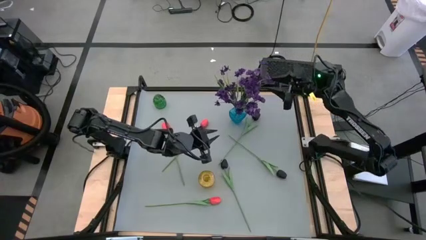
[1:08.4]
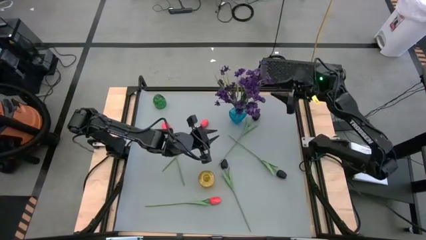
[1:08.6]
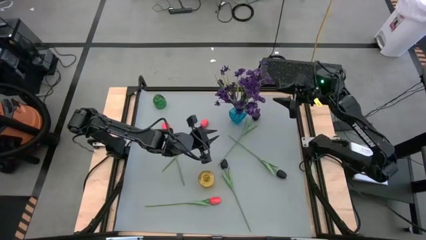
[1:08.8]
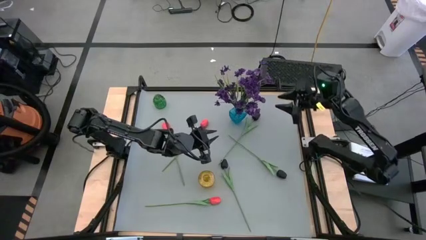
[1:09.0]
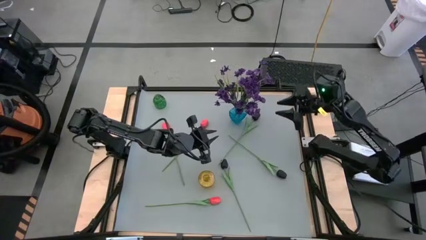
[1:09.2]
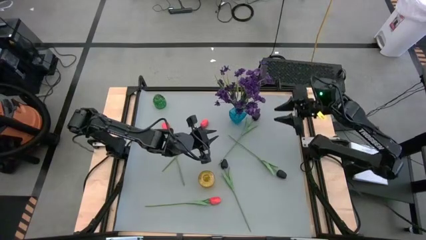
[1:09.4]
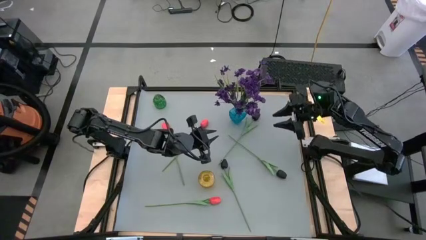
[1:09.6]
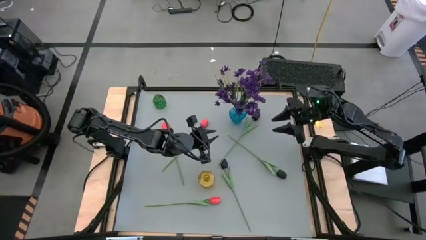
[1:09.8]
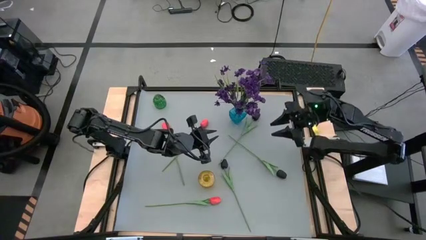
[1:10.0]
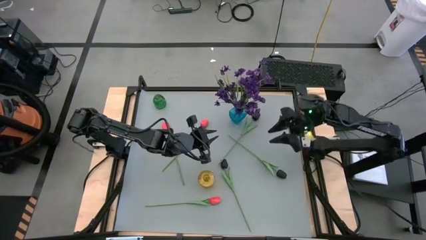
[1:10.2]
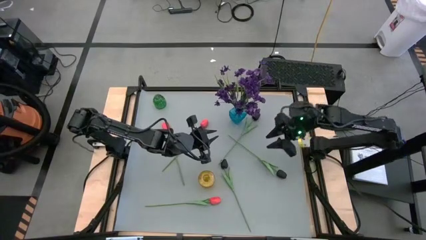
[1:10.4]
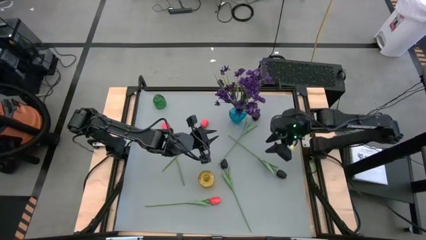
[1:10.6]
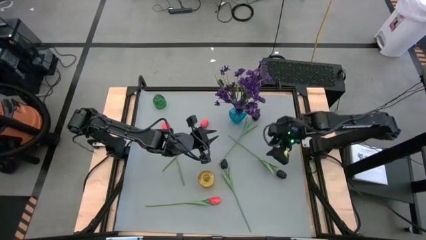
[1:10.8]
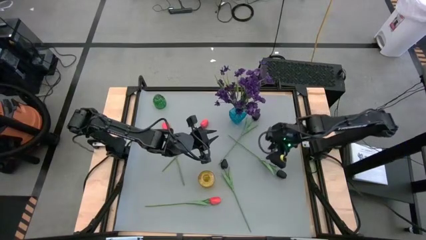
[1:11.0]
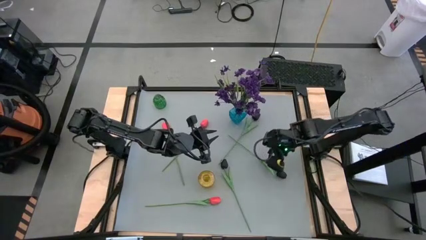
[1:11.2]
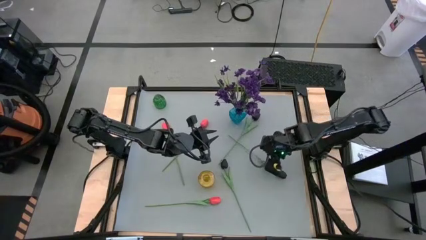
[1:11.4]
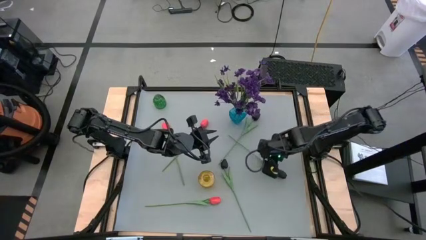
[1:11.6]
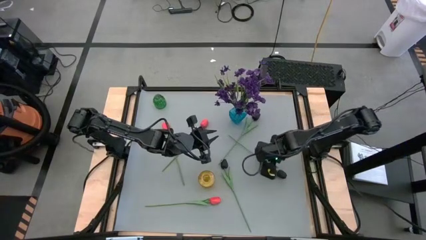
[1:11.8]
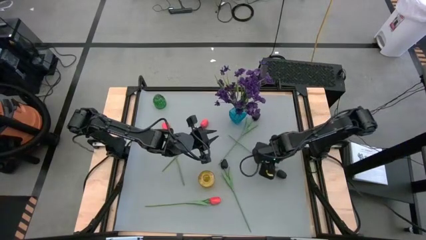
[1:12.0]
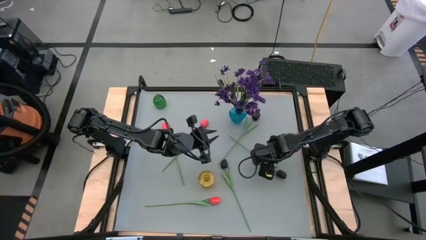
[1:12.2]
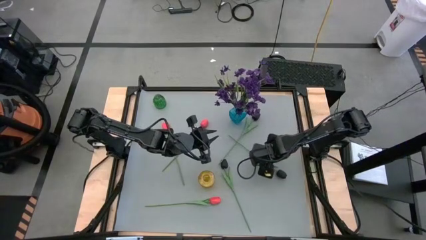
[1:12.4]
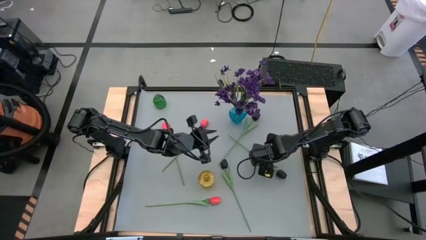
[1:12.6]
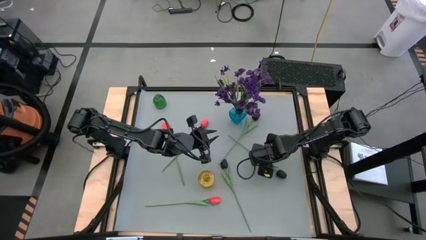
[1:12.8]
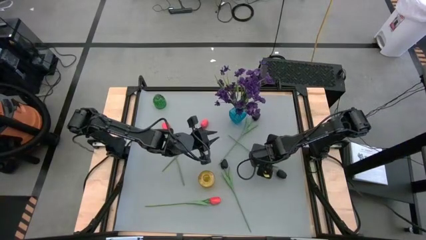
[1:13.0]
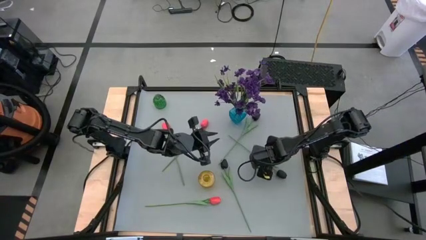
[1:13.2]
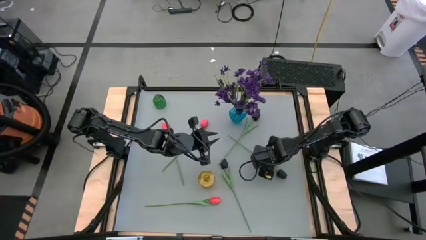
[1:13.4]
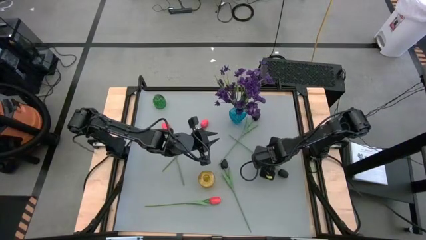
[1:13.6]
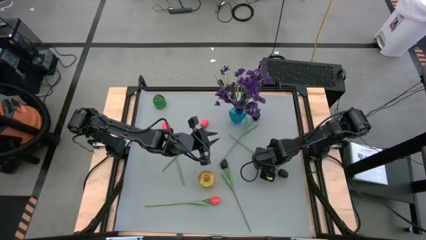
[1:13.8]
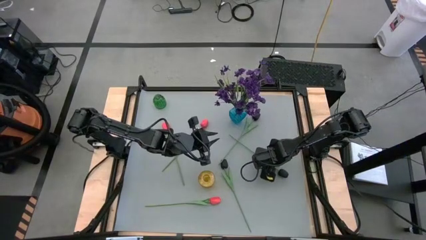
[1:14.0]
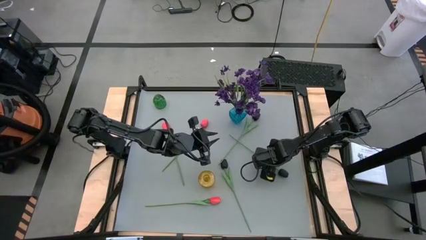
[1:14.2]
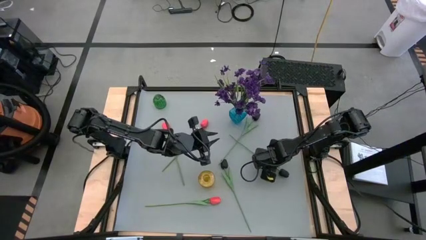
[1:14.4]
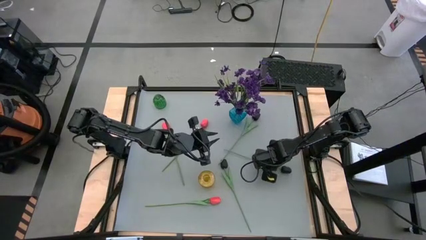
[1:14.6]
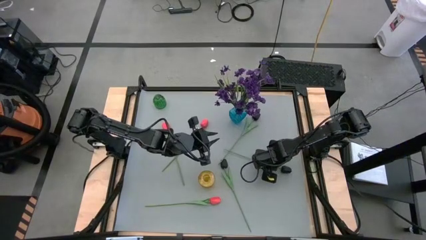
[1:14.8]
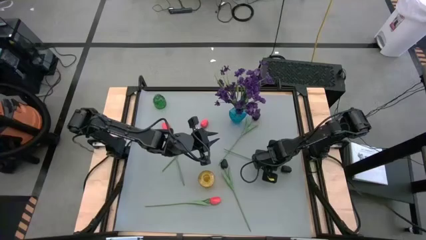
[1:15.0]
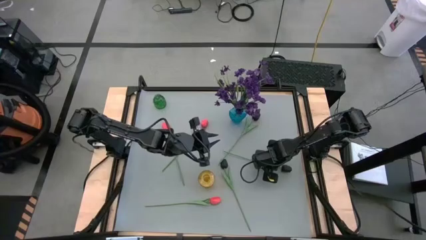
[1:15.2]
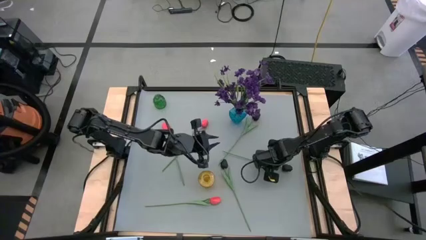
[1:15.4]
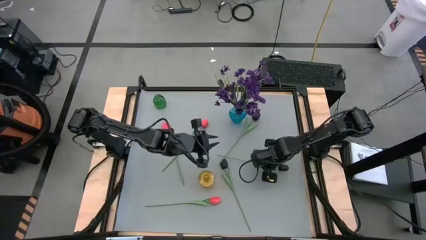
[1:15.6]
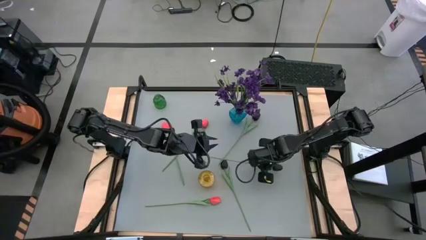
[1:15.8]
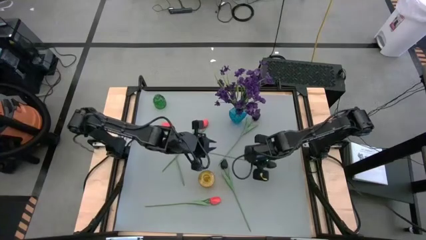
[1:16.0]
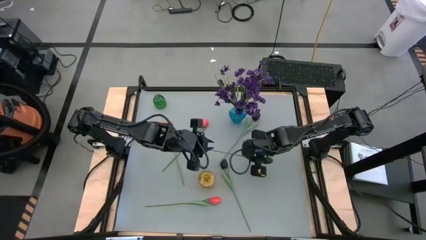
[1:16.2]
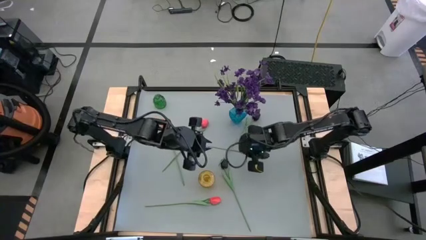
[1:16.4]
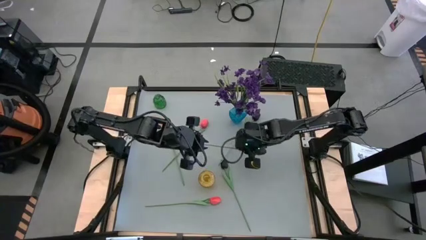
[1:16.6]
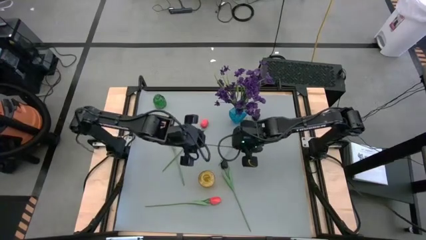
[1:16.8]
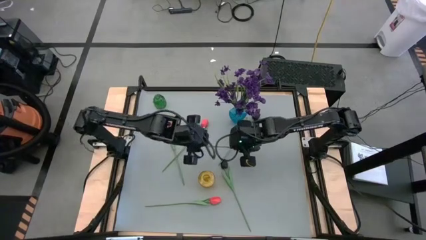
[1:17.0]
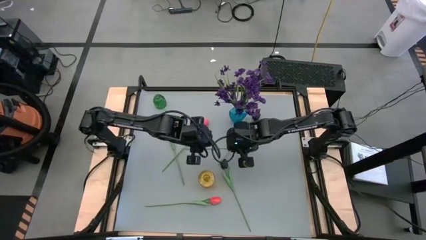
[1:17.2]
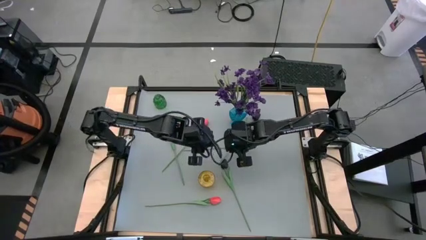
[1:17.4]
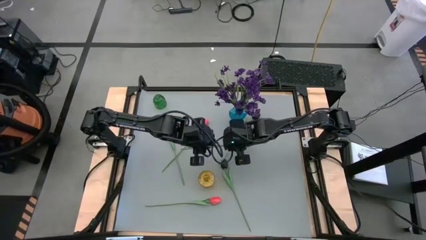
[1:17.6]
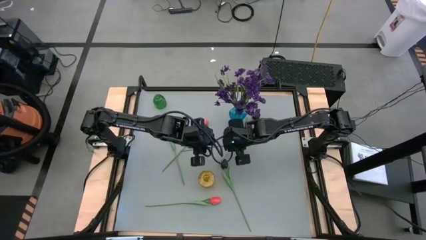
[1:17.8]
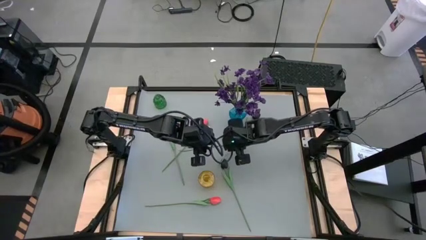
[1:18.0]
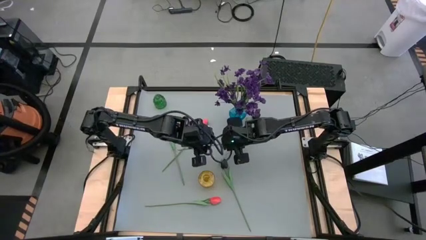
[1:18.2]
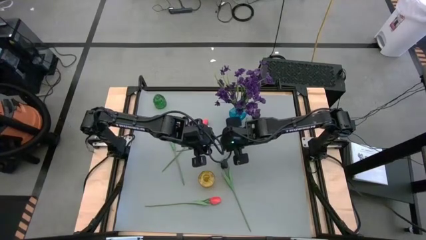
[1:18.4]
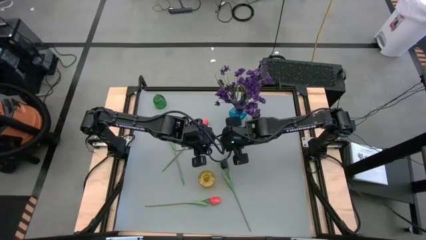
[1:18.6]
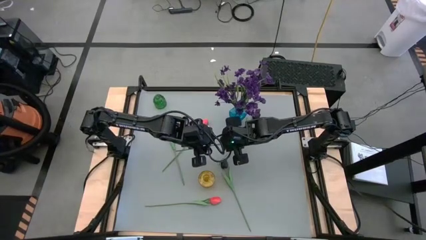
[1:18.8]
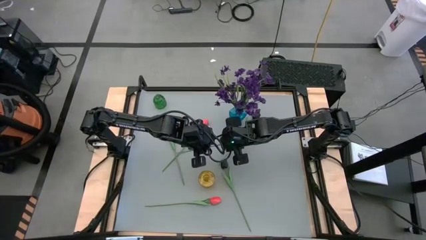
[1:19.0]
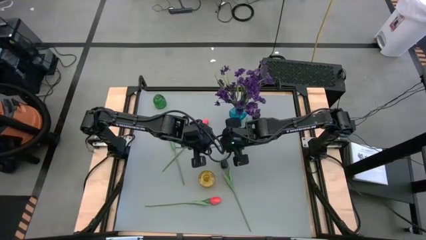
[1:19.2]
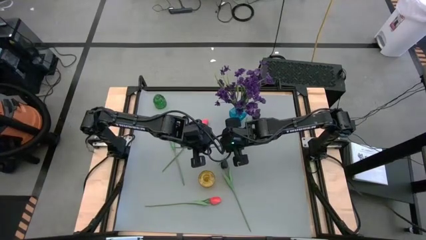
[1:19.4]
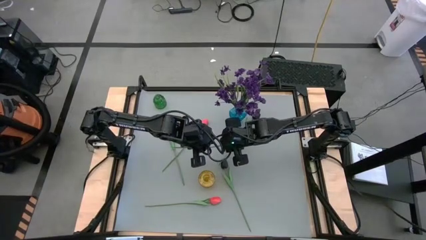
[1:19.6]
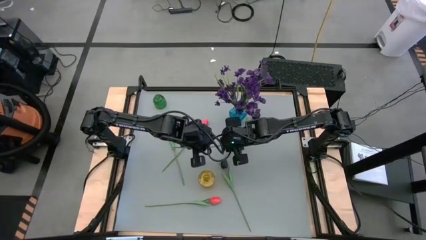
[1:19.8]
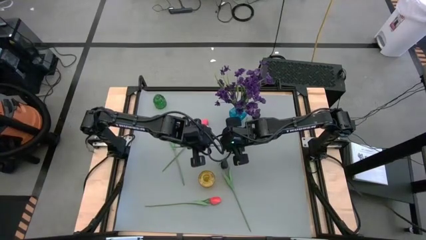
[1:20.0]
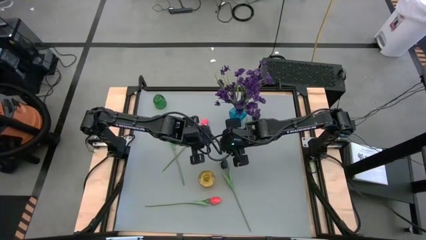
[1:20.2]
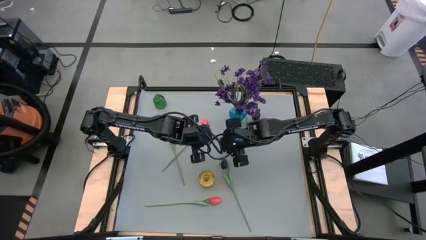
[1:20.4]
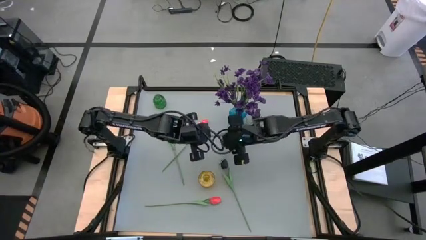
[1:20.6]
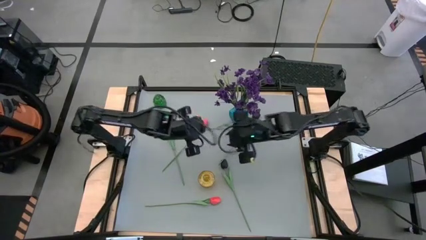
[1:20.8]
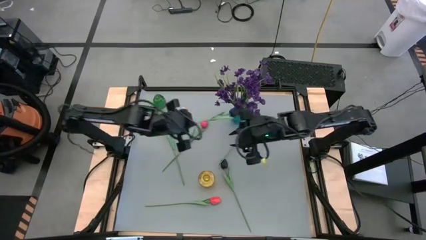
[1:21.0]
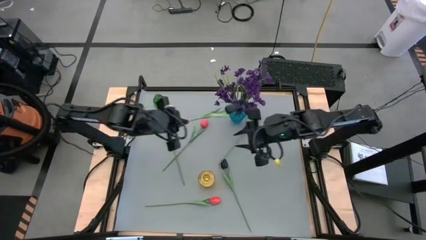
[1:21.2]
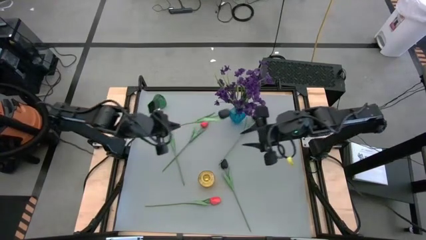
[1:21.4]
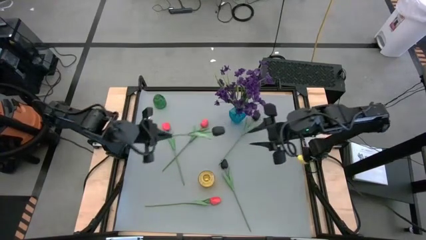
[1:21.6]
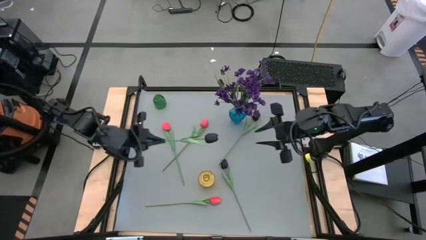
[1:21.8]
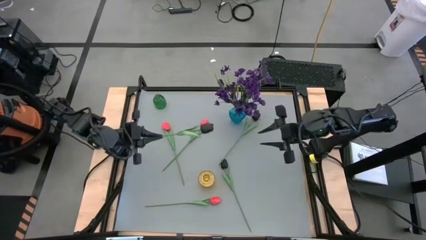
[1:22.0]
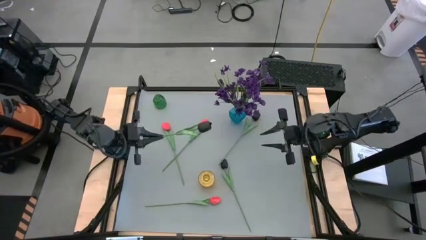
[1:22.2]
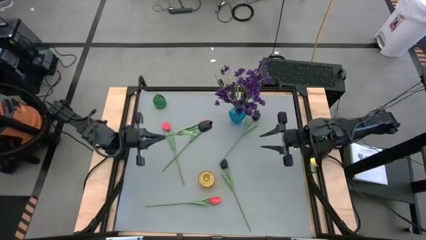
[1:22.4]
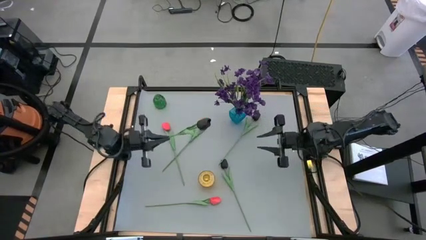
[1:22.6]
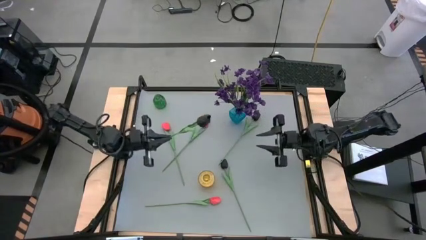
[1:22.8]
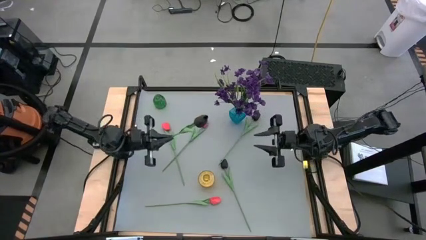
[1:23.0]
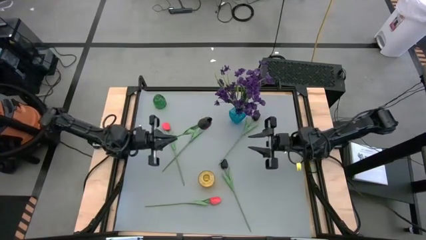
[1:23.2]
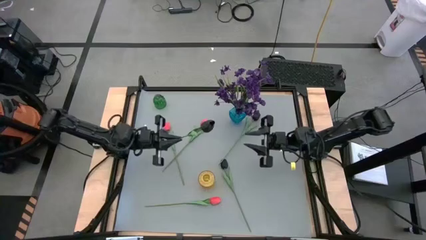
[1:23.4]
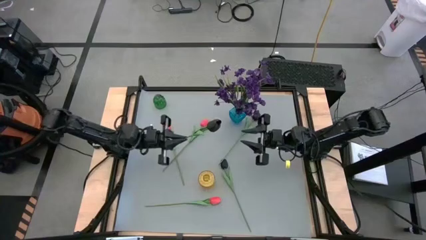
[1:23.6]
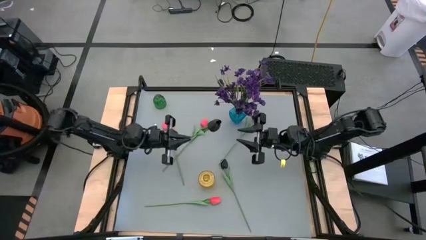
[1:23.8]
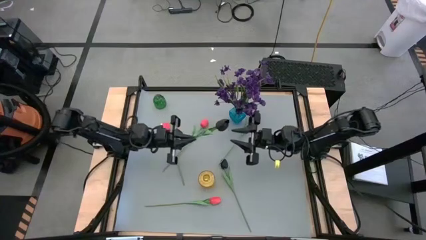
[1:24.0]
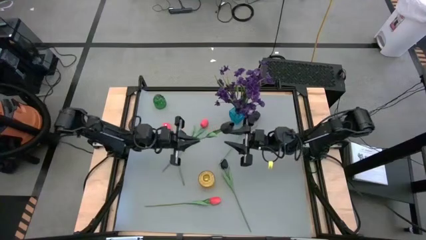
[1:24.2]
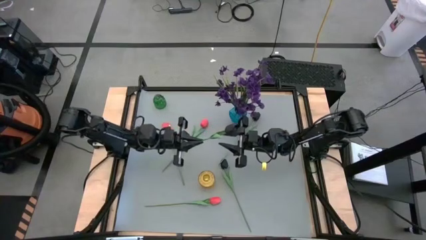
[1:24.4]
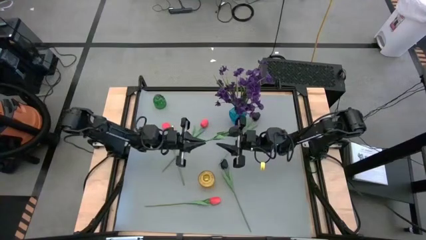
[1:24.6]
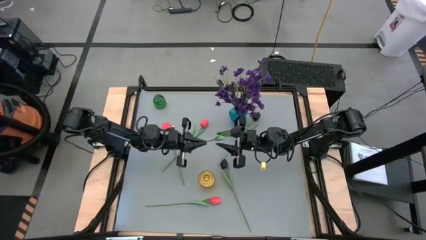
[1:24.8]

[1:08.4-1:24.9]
Task: Sort flowers into vase by color
Put the bottom right black flower into the green vase

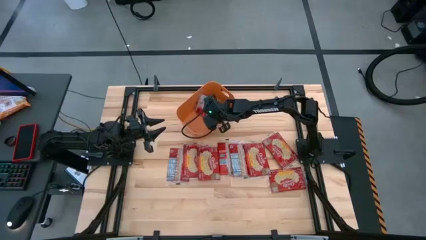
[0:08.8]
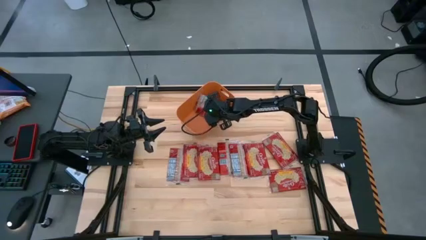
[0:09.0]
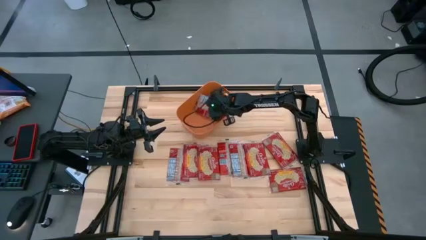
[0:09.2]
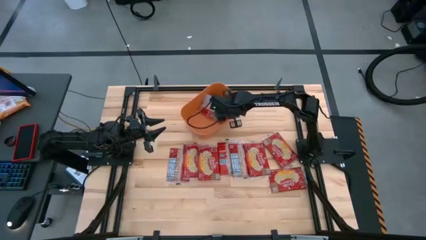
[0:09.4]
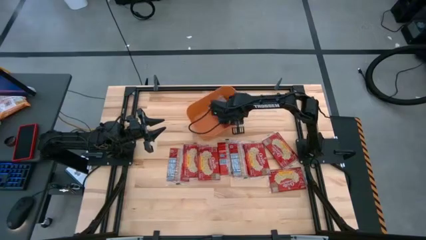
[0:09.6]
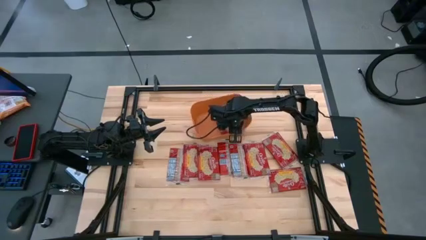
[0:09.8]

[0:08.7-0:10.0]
Task: Sort popcorn bags into baskets
Adjust the orange bin
